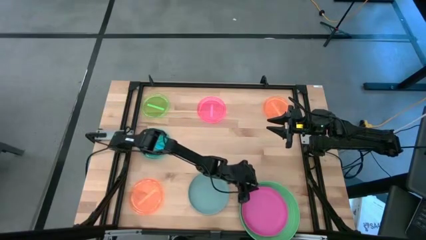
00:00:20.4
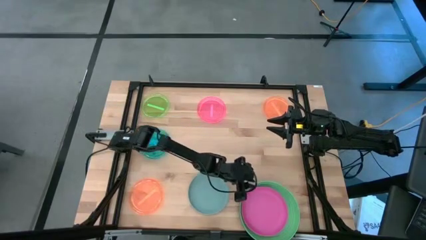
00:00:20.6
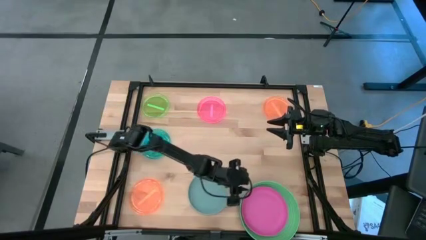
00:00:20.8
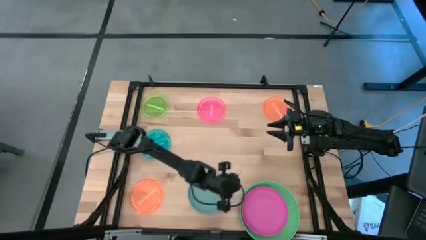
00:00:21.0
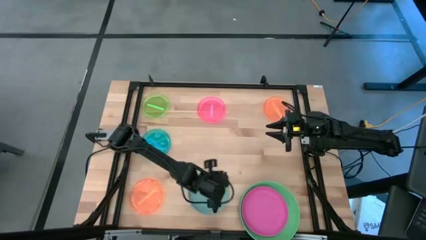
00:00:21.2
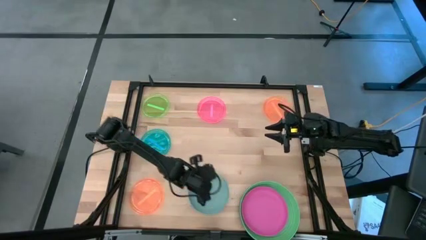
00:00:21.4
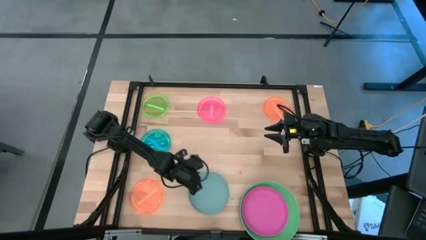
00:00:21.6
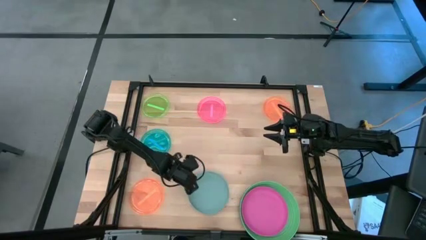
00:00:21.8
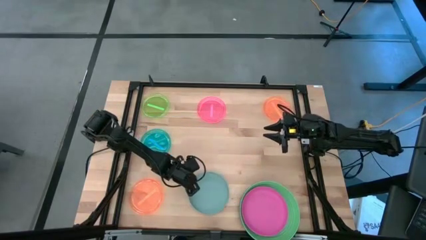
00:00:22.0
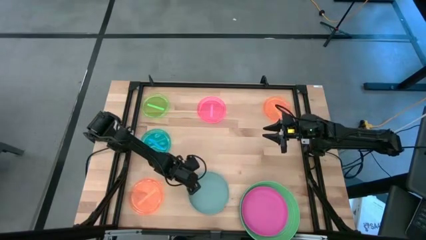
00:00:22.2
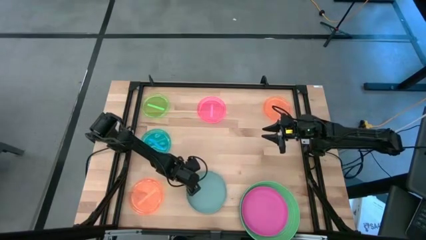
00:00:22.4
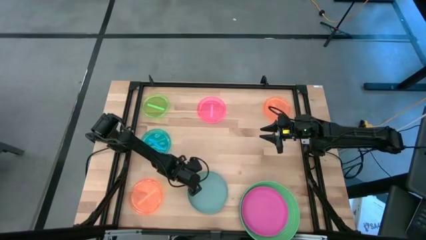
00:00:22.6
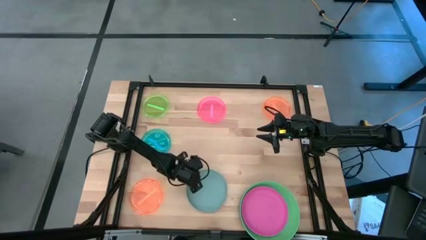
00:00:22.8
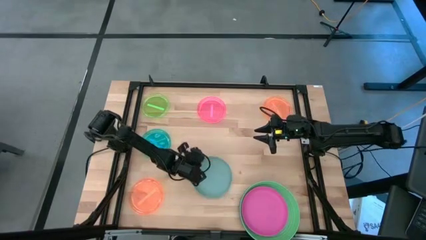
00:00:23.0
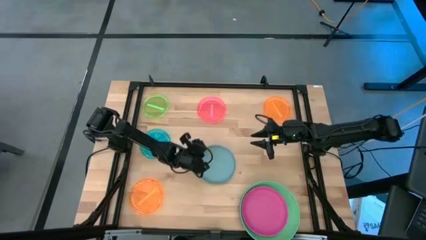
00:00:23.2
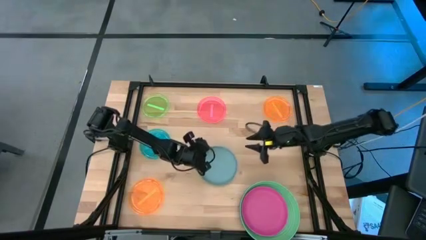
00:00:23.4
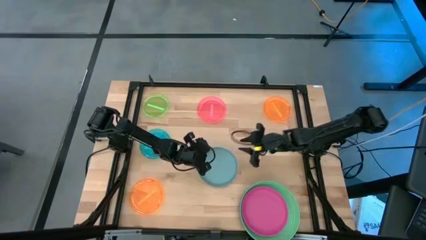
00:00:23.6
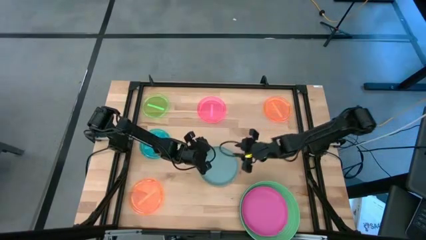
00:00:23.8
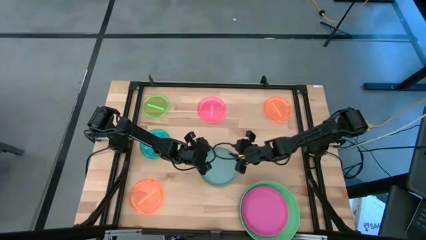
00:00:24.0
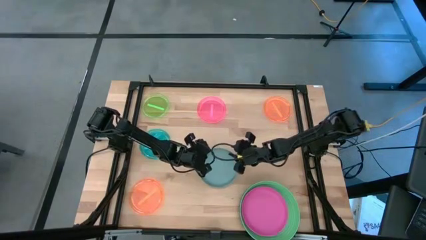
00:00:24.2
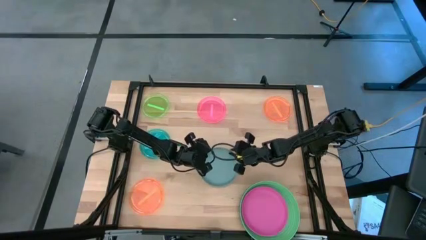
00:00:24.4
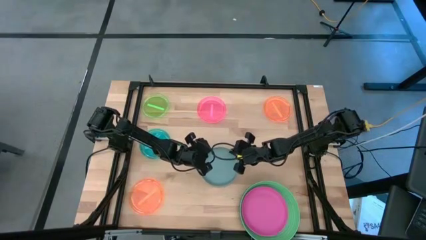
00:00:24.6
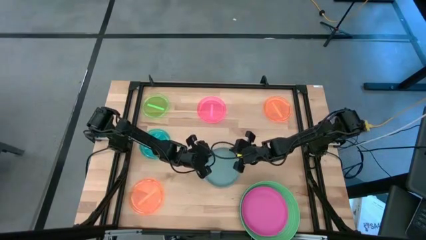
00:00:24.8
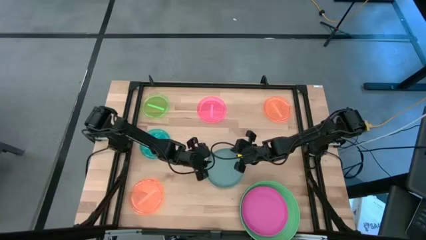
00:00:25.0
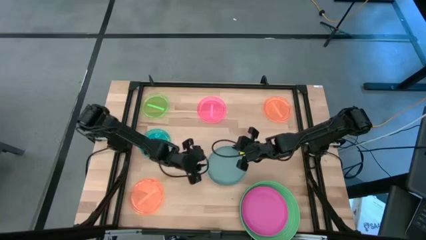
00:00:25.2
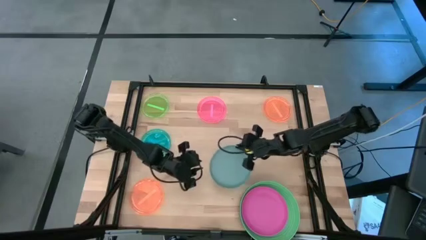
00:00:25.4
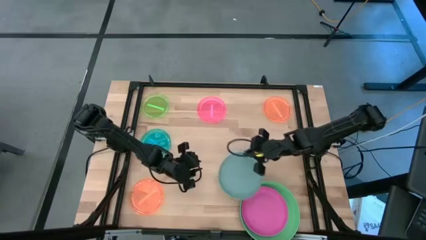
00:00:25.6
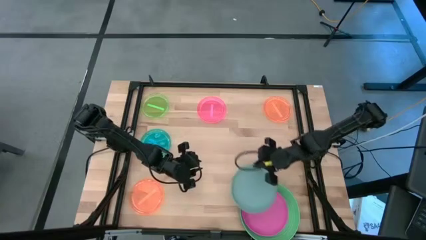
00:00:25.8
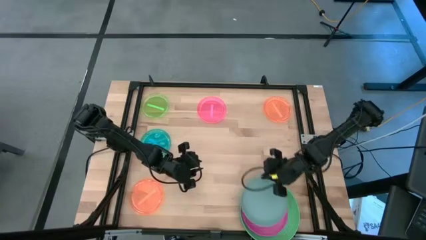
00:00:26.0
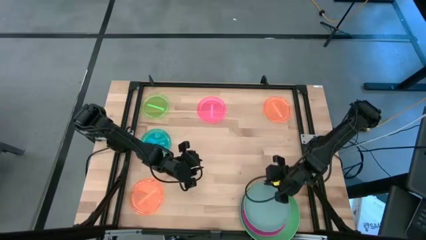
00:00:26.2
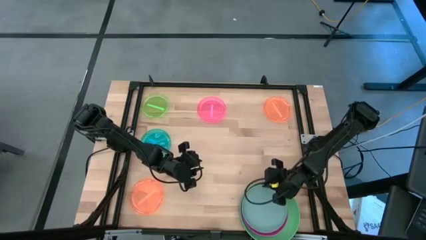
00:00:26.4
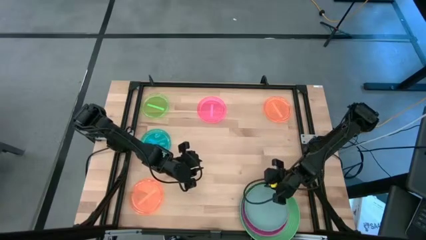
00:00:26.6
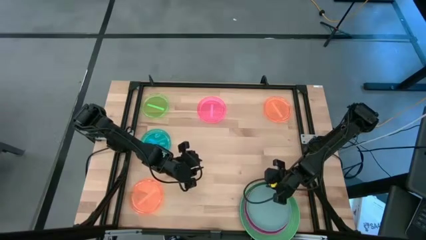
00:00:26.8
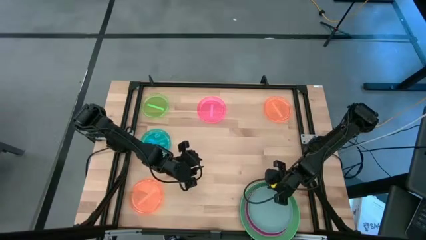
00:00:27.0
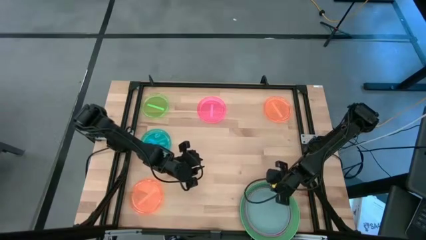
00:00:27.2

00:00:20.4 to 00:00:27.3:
Task: Stack plastic plates
Stack the blue plate on the pink plate

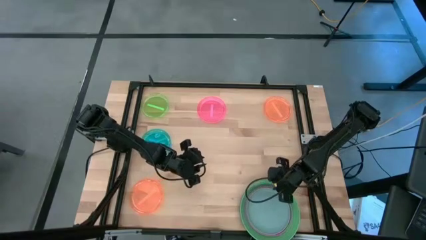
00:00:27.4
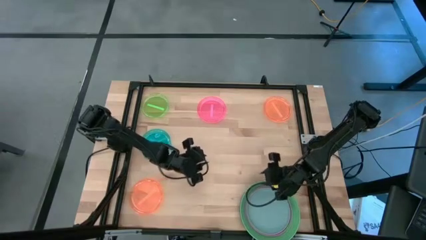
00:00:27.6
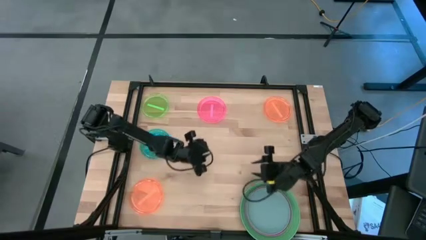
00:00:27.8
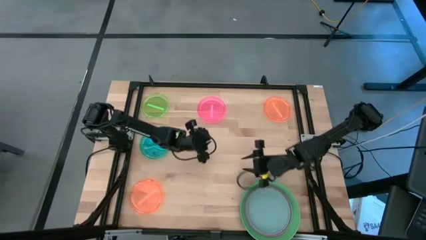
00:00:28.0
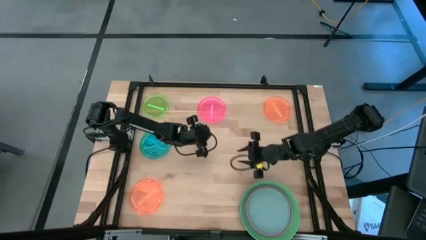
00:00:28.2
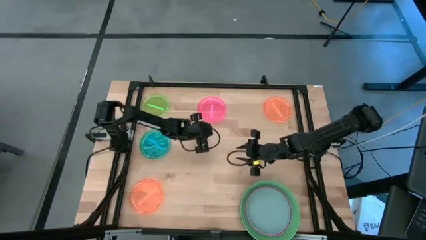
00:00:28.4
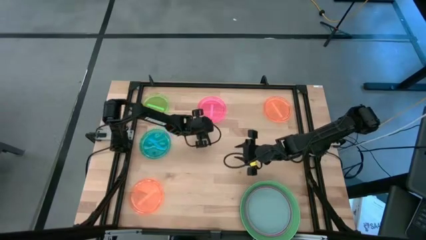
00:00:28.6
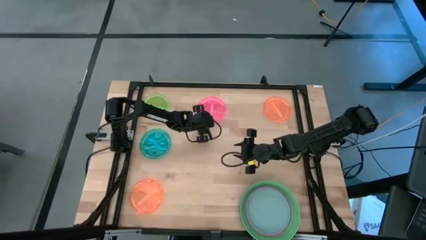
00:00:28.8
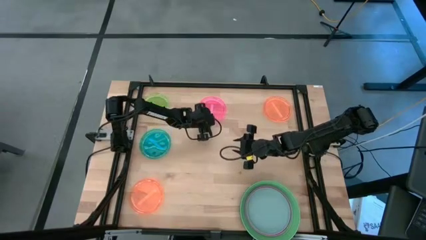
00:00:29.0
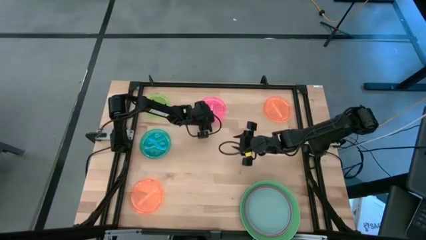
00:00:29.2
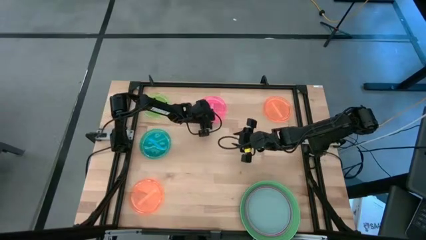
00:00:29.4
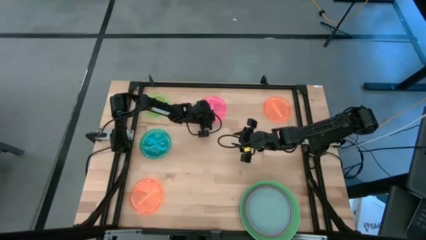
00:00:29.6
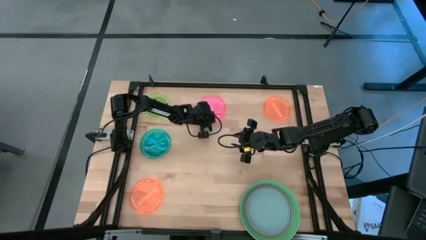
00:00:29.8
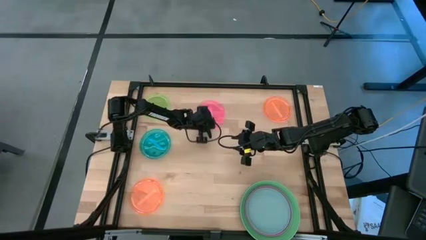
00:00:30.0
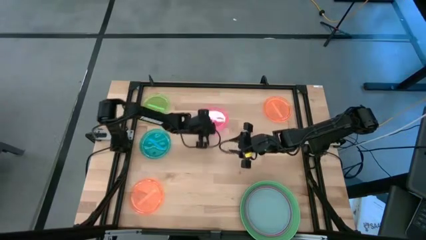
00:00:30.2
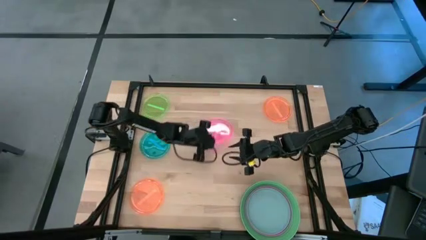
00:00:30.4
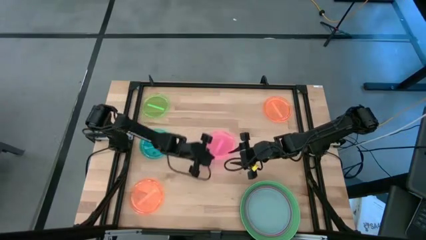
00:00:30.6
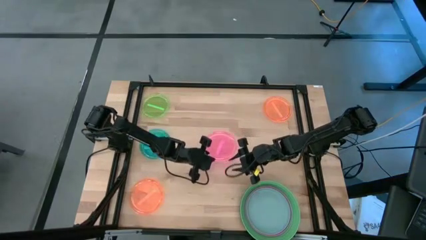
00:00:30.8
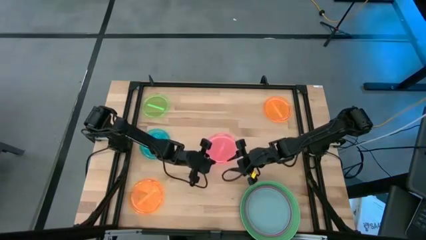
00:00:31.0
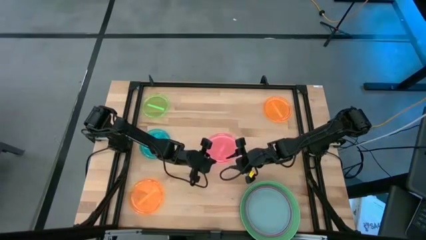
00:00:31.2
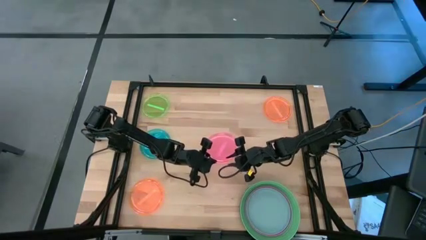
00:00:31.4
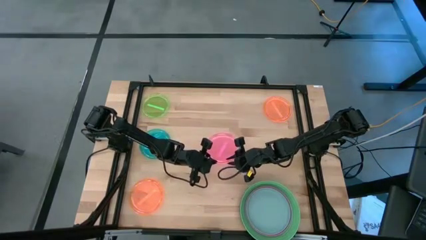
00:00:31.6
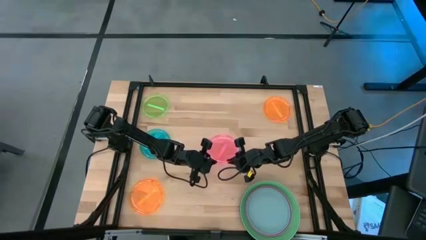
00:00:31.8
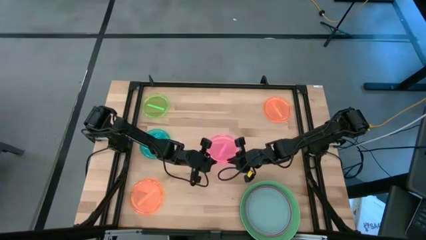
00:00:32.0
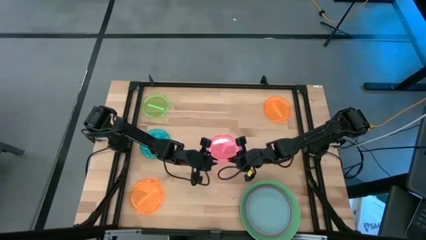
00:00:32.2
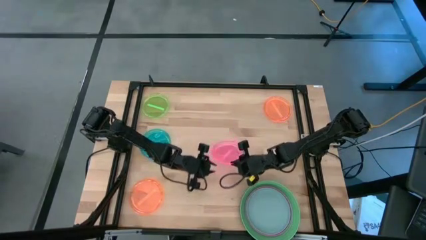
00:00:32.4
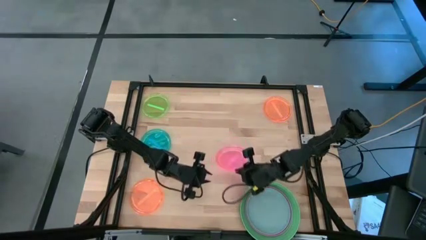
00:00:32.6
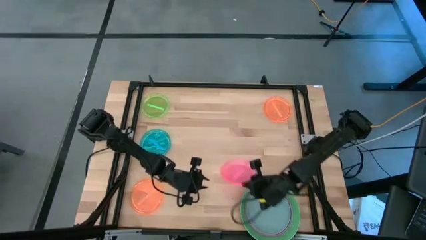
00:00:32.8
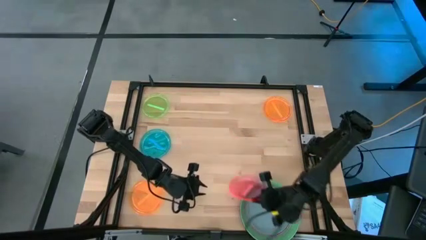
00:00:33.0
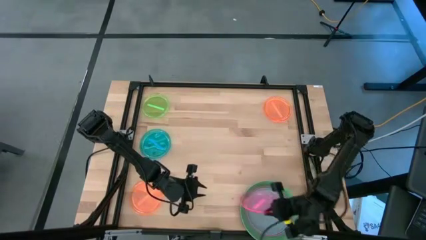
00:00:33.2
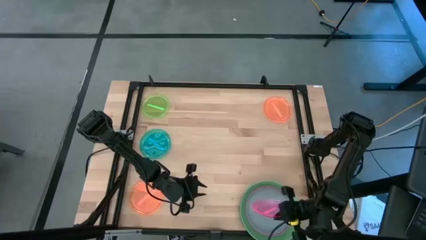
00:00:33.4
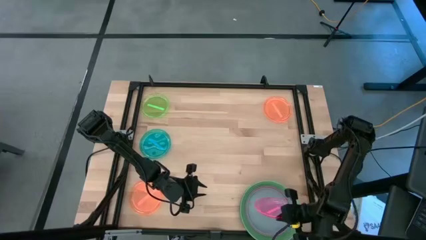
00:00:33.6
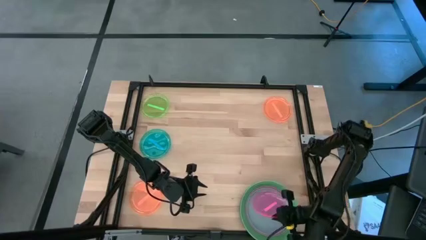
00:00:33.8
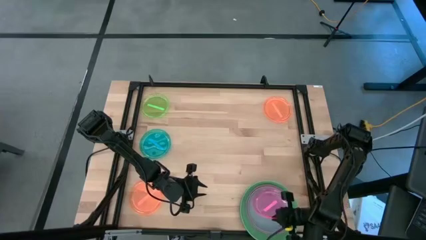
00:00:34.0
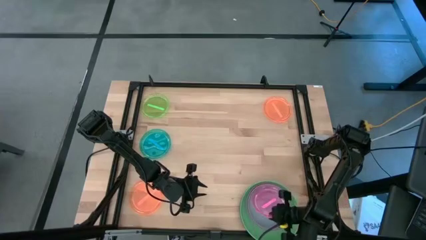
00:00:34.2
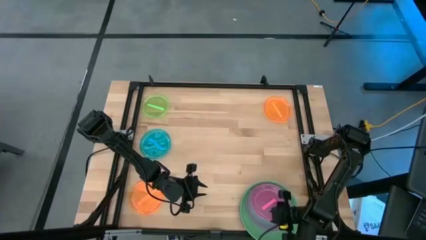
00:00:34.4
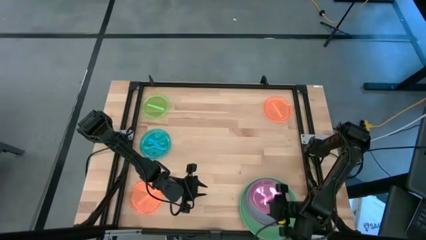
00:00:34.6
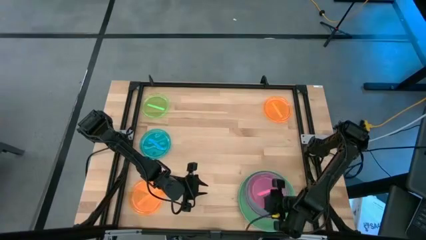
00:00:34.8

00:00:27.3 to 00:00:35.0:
Stack the light pink plate on the blue plate

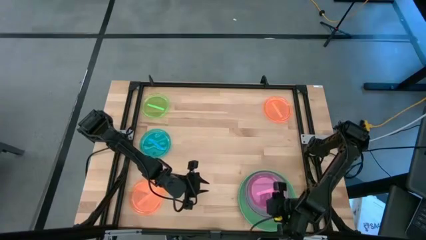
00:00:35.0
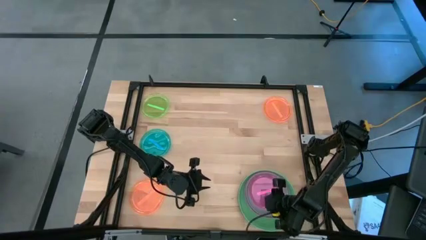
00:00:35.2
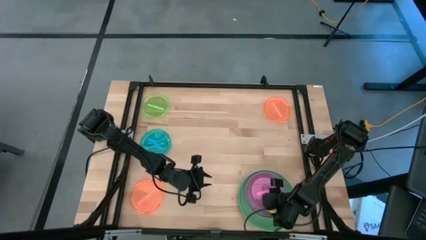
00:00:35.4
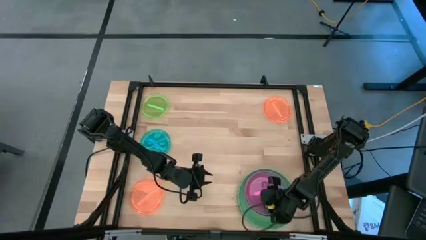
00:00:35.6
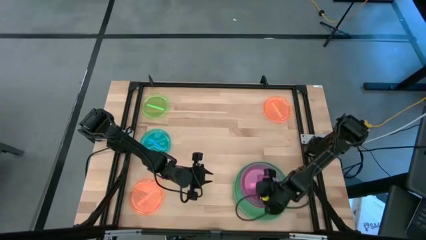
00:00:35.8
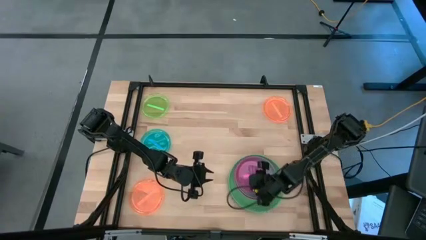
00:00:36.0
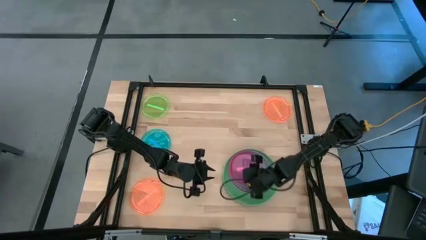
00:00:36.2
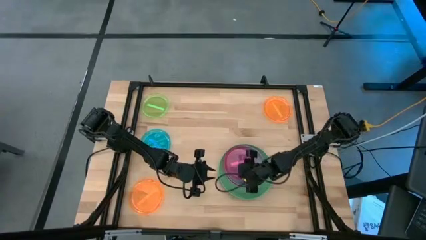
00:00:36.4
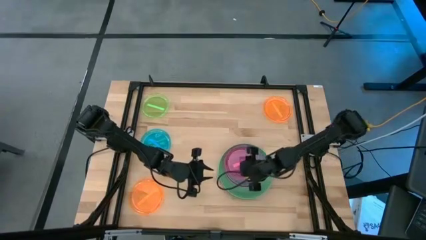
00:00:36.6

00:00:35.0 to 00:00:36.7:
Move the stacked plates to the center of the table
